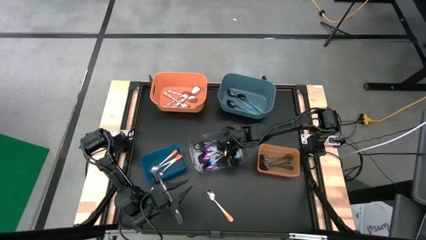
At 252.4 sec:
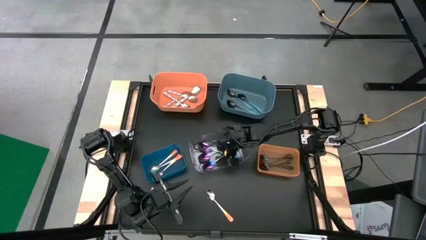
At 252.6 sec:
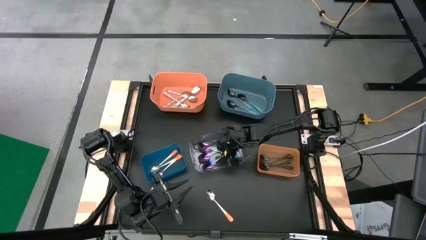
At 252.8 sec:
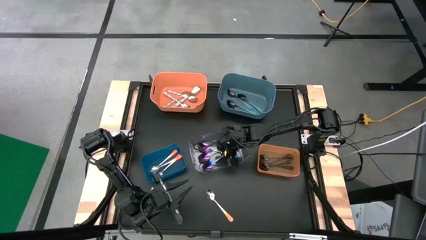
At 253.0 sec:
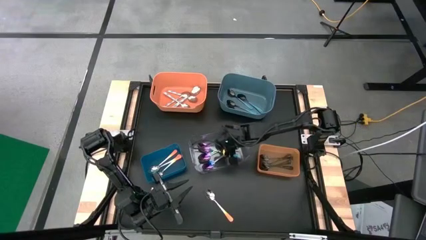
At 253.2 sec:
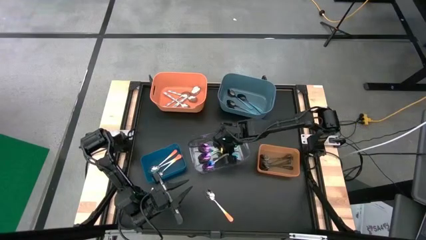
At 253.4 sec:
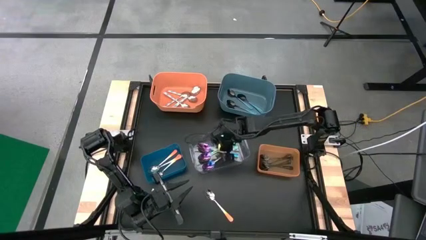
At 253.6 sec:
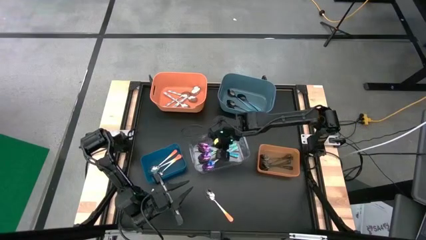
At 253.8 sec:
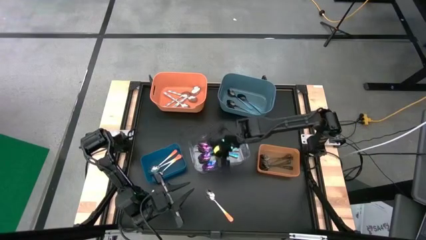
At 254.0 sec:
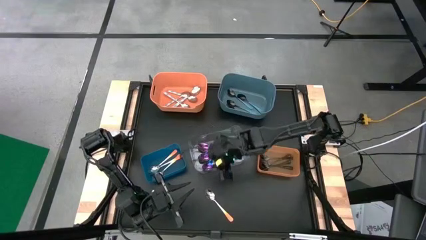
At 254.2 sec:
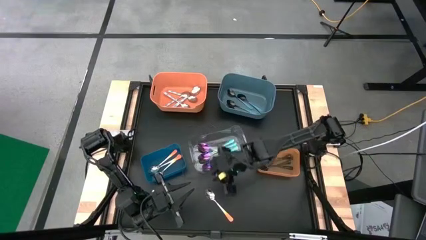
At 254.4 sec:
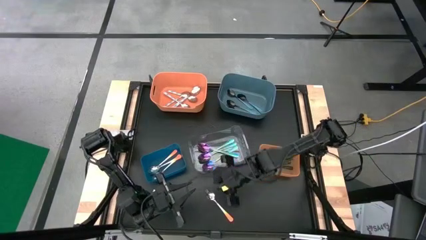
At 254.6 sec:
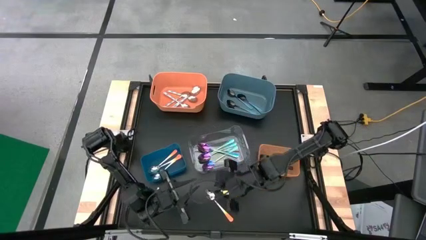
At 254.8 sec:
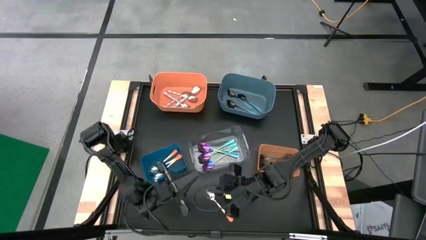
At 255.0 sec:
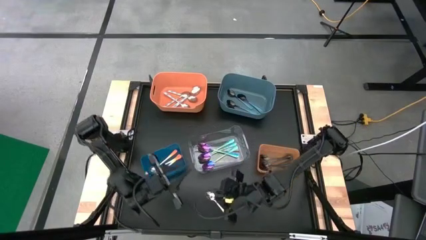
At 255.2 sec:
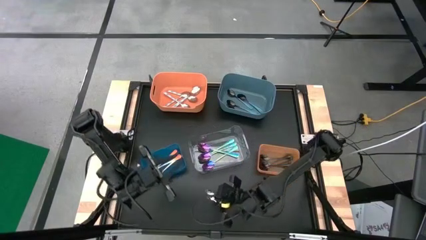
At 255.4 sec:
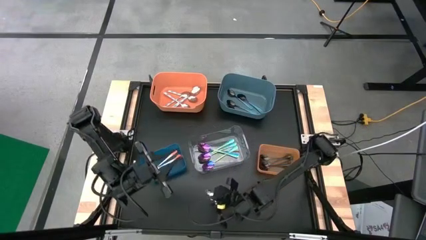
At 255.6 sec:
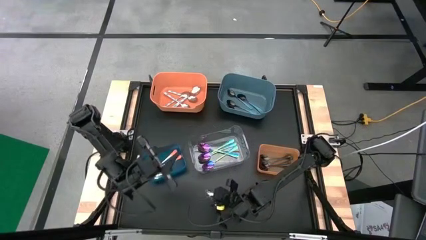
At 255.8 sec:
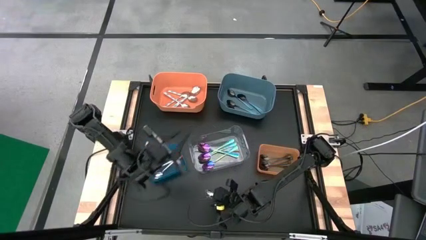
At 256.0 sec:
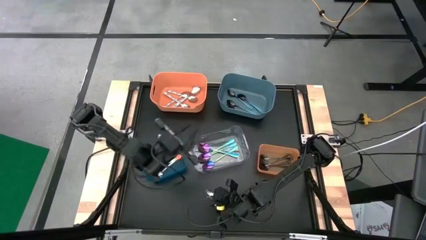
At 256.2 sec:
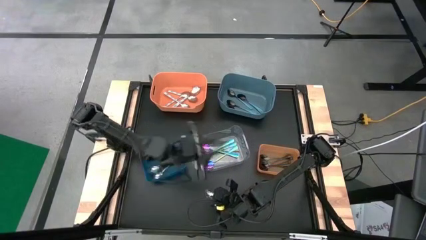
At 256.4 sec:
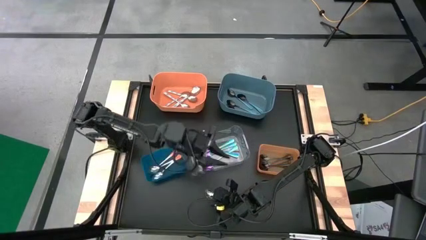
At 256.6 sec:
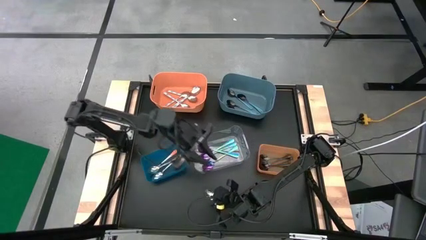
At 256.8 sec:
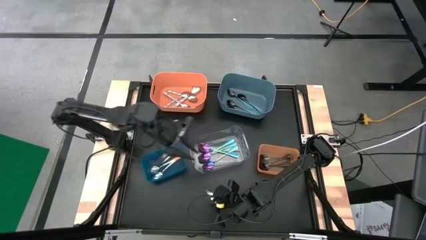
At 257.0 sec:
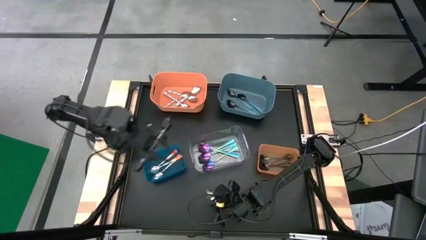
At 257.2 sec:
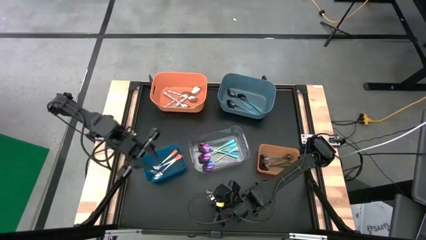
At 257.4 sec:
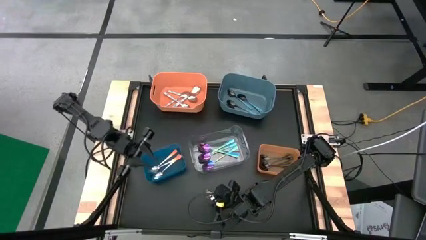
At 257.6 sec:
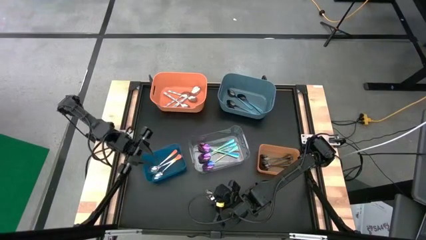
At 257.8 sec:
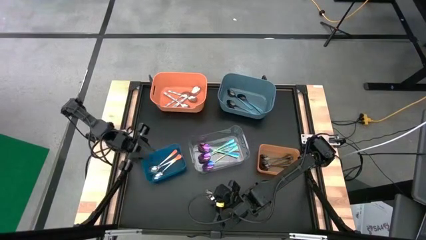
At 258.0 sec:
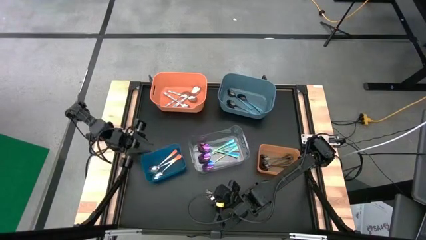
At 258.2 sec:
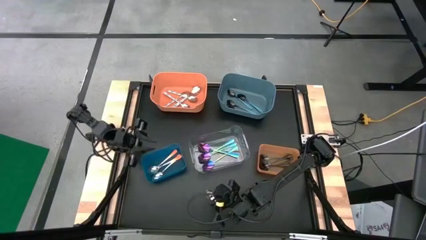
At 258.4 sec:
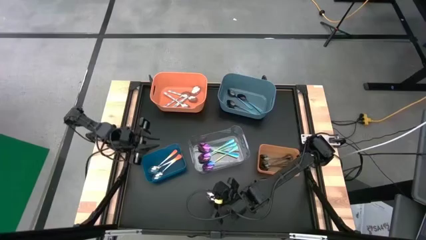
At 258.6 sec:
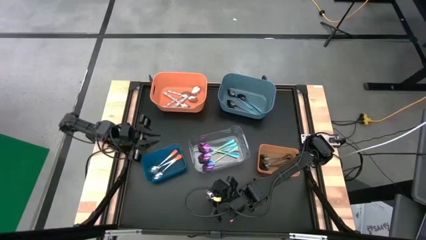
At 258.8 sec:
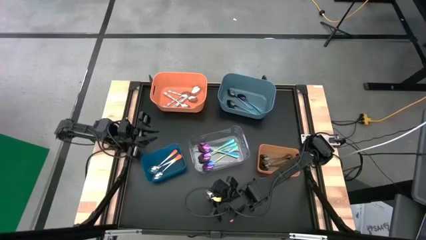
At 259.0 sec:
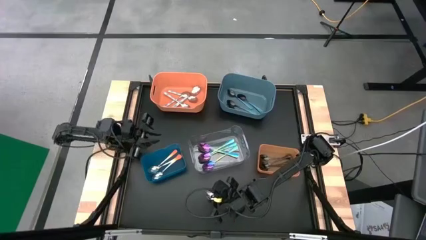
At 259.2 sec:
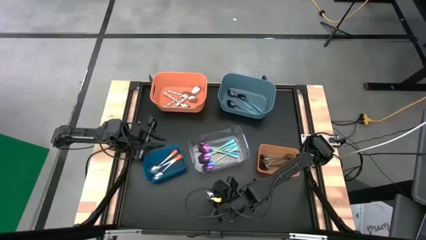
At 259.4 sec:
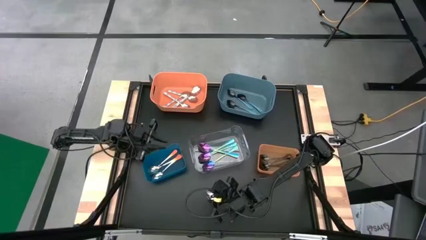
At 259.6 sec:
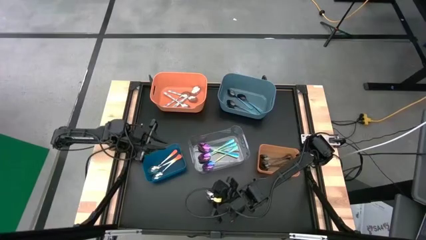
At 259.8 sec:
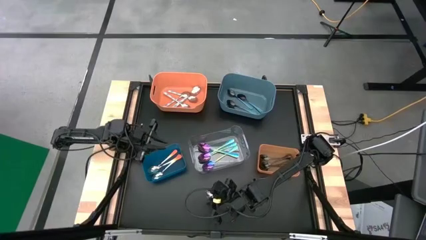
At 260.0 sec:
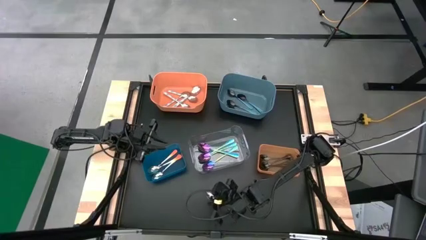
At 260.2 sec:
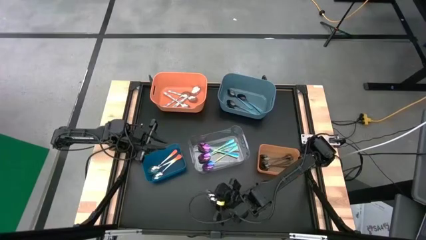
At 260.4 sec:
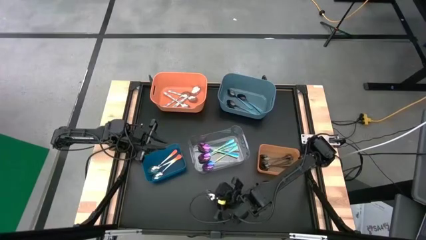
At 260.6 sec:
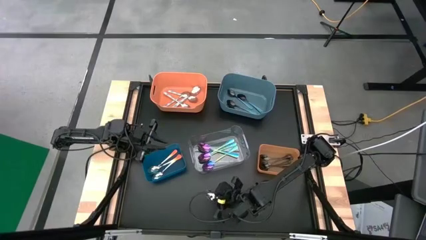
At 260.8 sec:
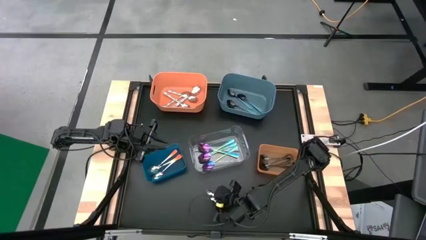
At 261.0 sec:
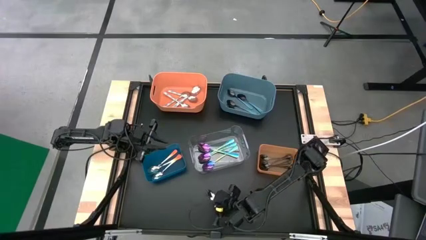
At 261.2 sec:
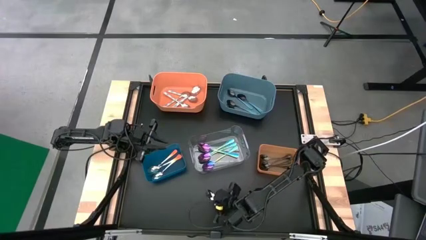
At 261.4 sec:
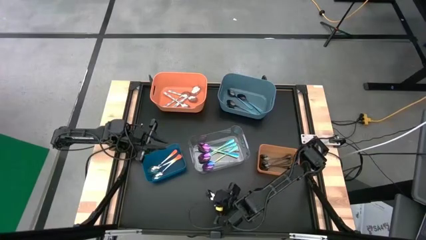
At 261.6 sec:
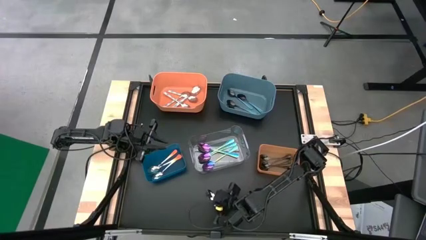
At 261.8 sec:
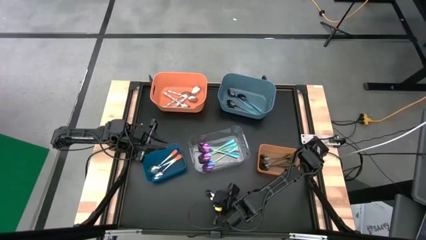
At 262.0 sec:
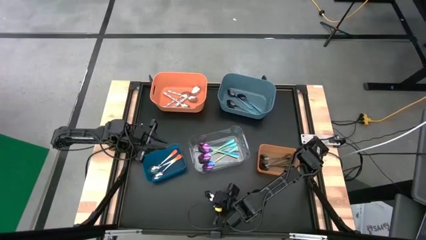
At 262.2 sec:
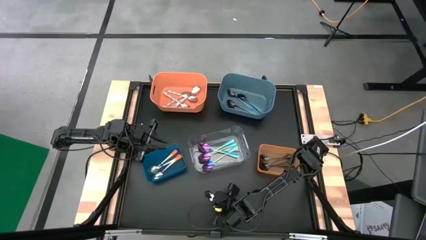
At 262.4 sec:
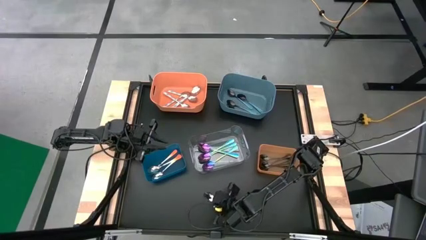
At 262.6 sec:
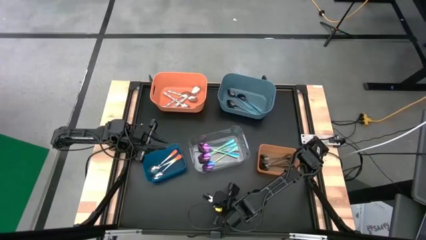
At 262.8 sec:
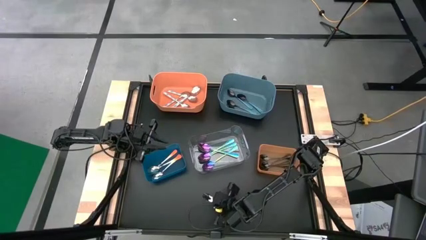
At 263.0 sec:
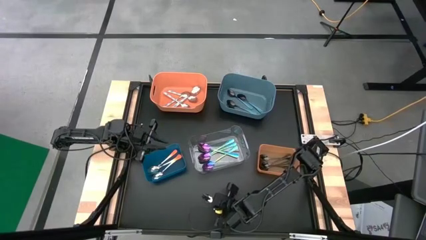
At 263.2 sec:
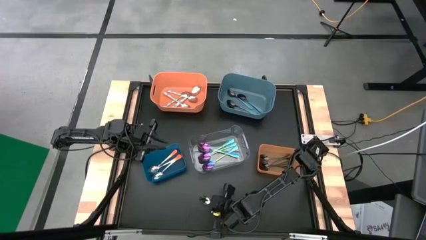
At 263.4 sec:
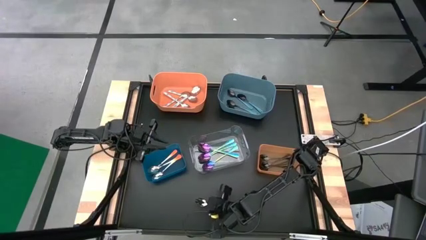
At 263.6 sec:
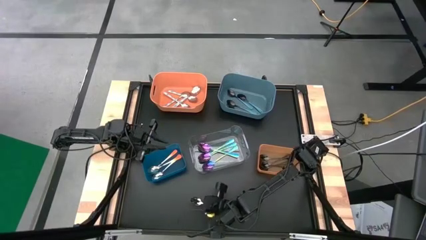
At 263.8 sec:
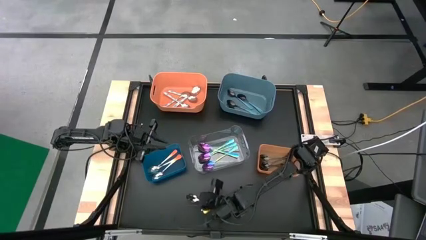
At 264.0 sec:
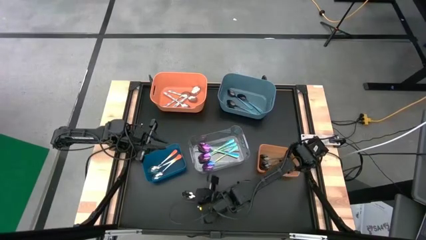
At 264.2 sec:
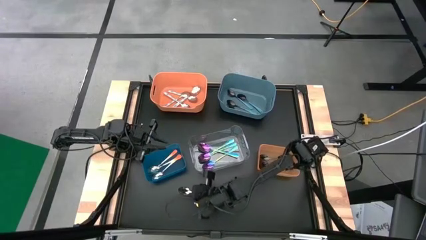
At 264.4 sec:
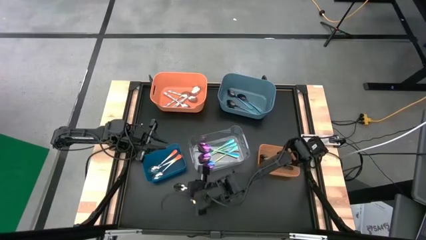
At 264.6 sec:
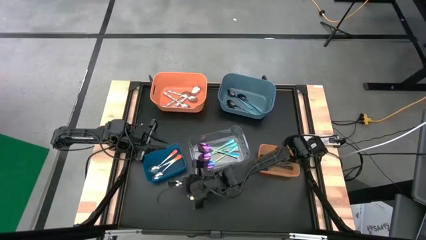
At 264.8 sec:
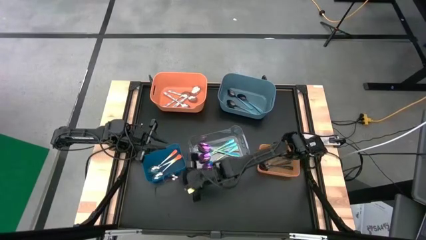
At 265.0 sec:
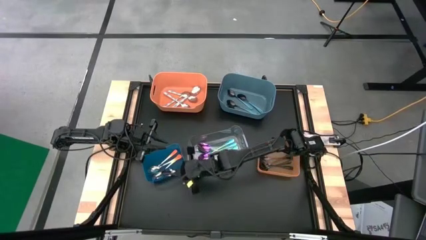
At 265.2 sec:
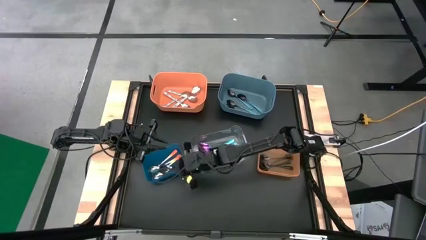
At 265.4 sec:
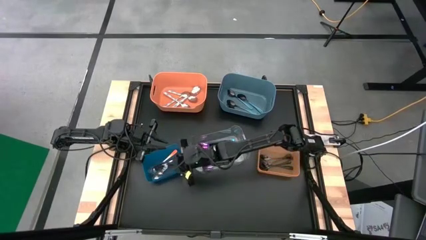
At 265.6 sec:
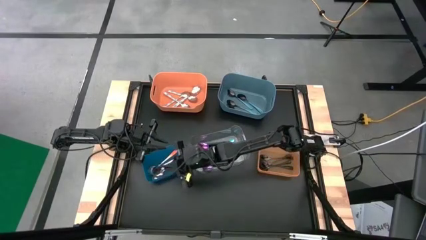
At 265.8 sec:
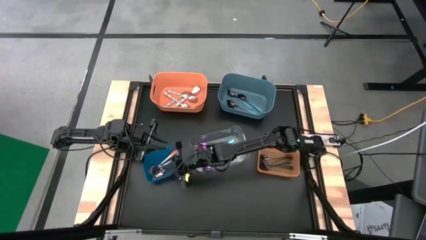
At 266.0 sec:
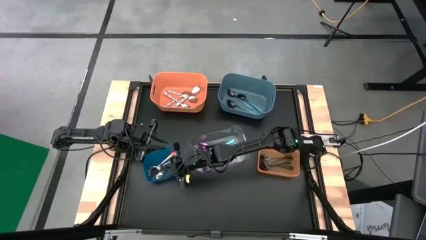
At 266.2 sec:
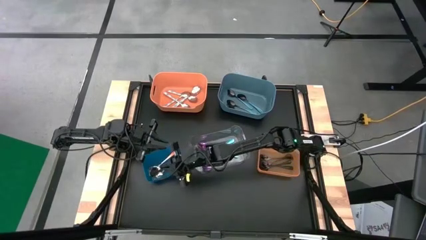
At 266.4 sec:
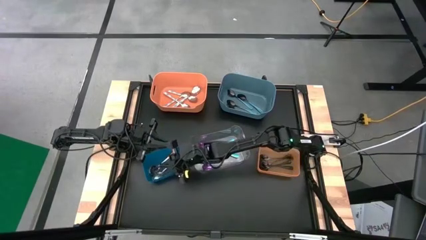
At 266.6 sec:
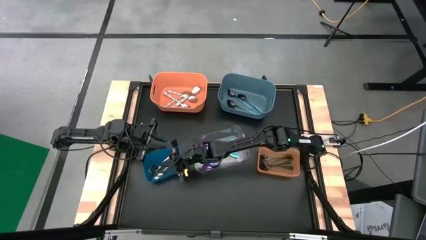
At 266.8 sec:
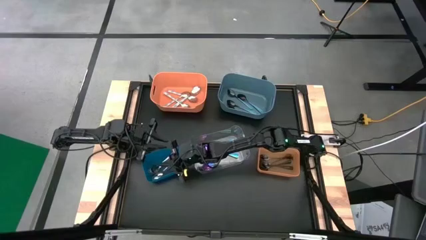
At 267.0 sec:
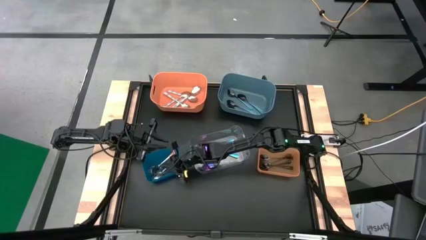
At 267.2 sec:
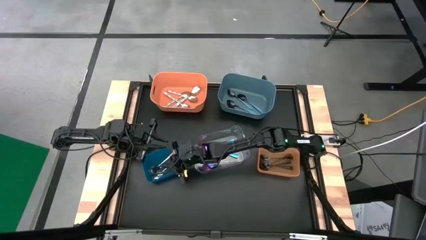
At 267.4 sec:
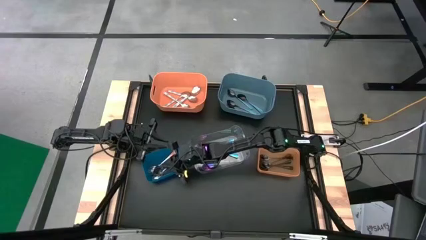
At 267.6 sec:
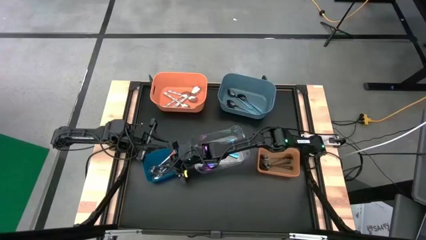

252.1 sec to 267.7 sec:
Task: Sort silverware by color (type)
Put the orange spoon into the blue bin
